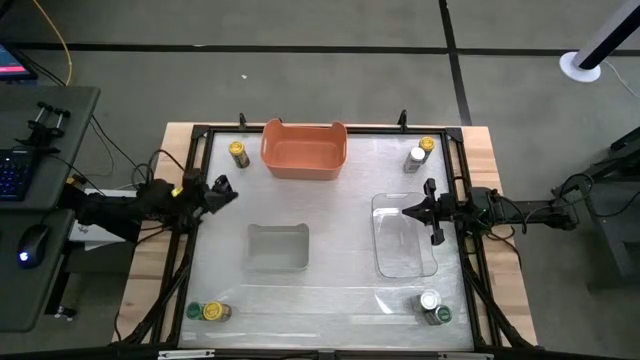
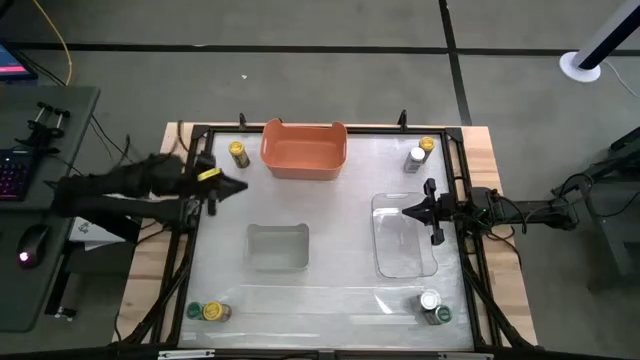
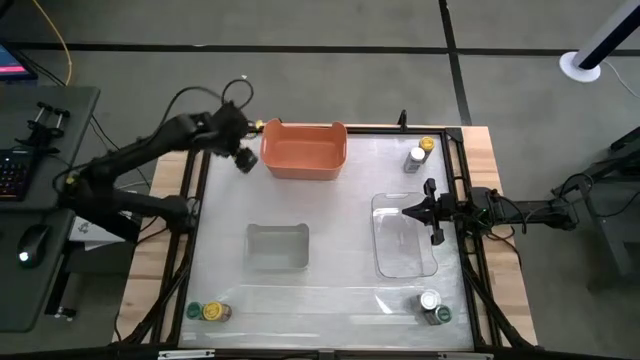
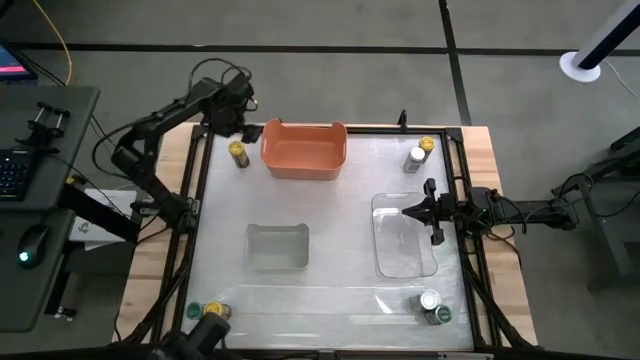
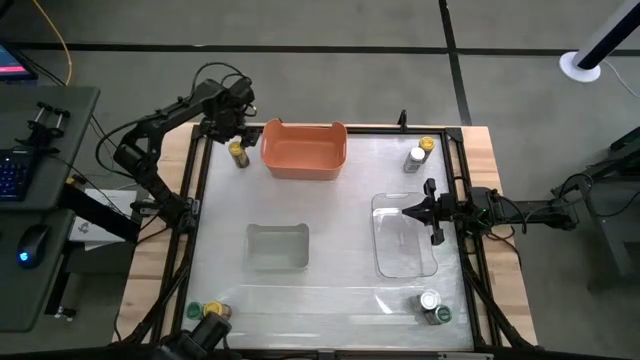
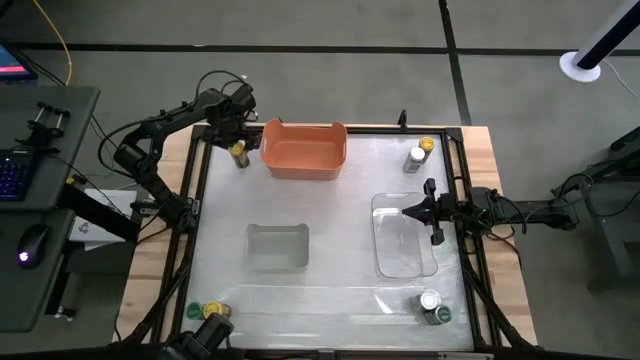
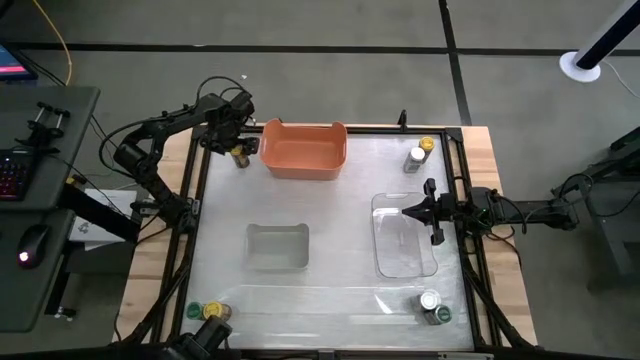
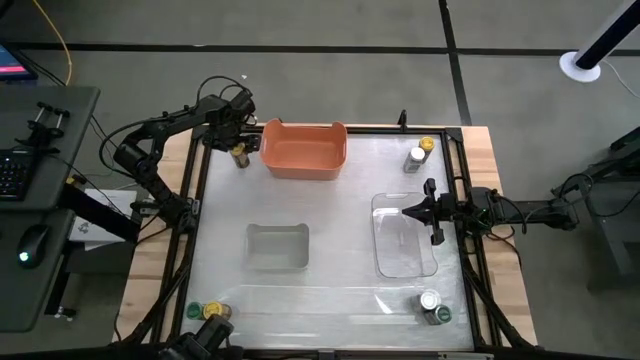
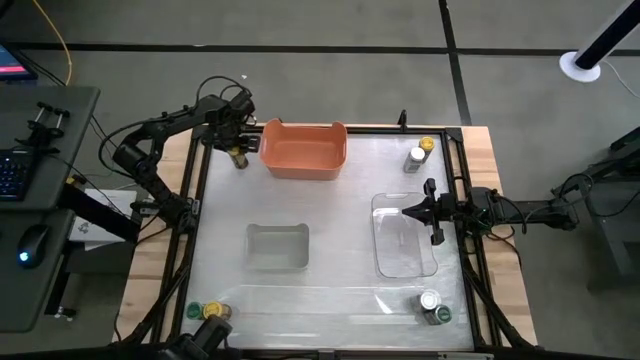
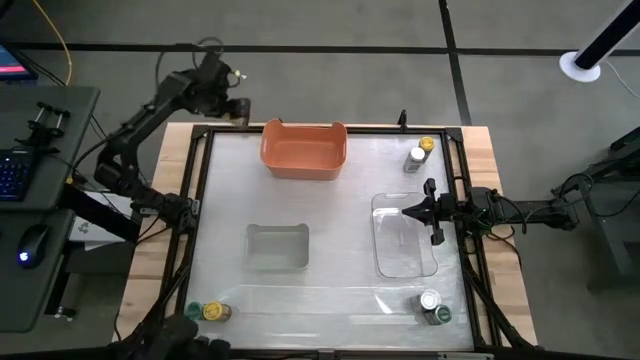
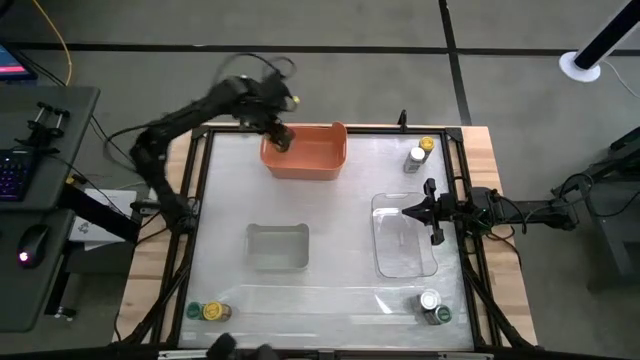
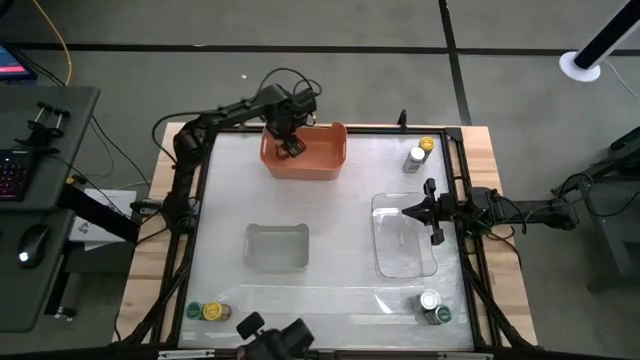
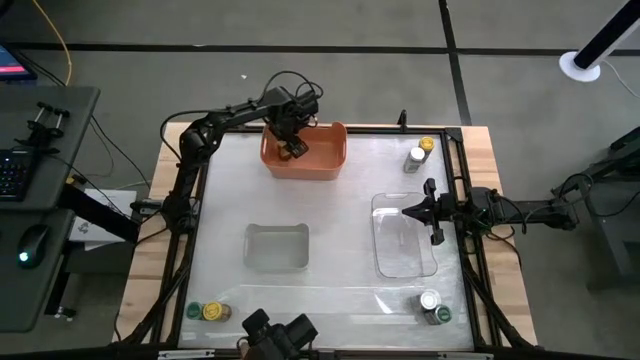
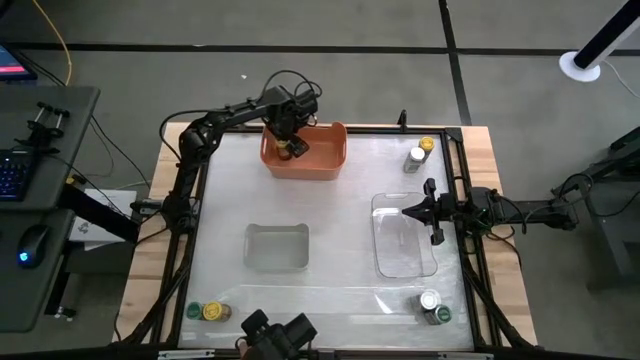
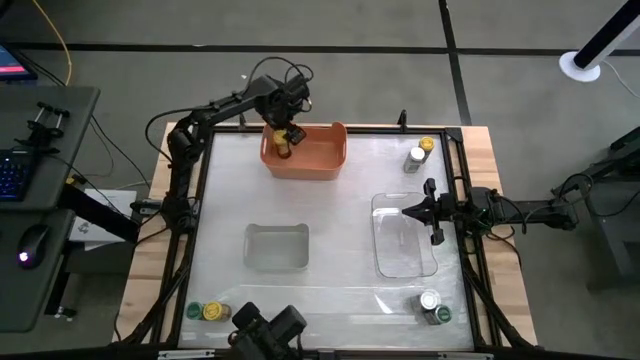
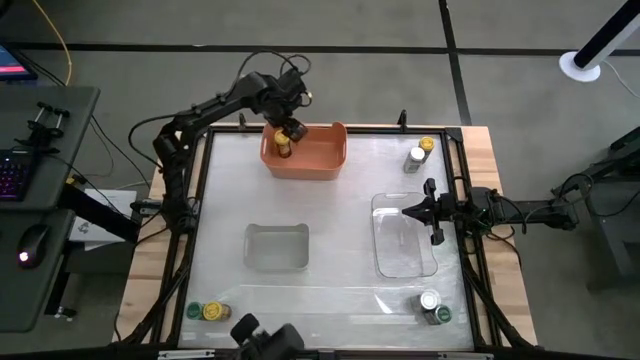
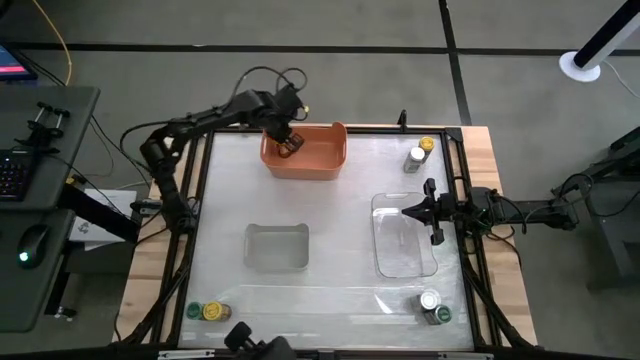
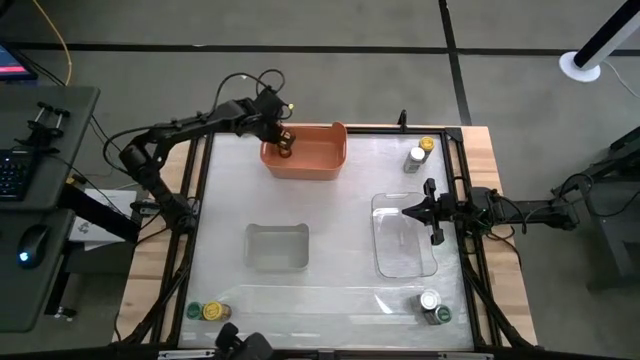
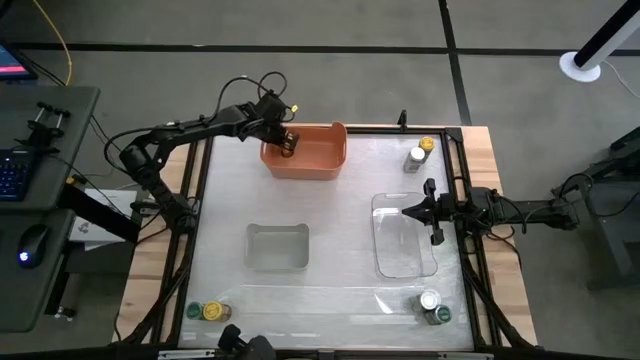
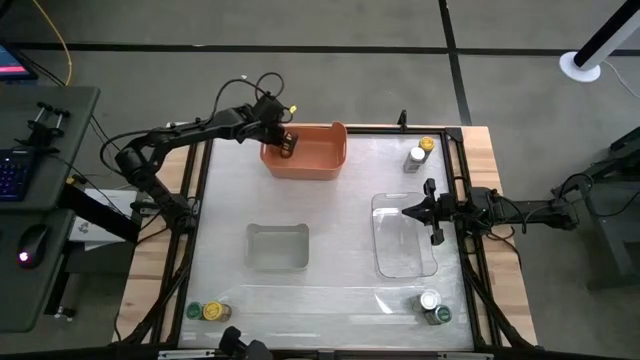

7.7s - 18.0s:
Task: Sort spices by type
Put the top left yellow seasoning bottle into the orange bin

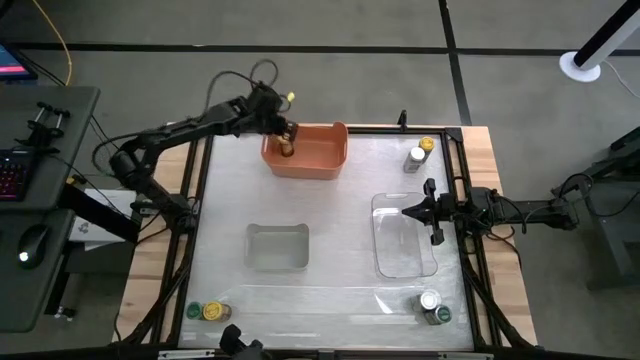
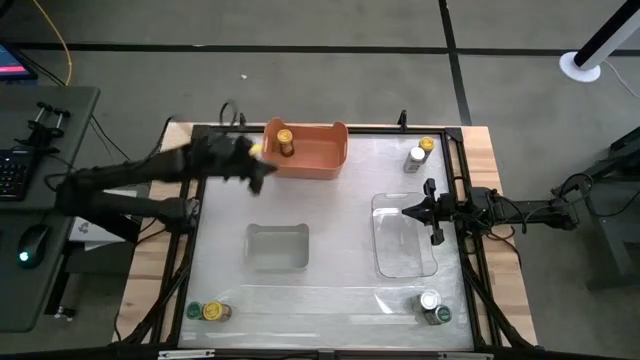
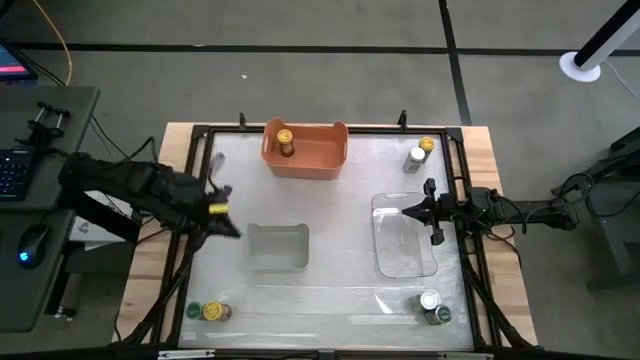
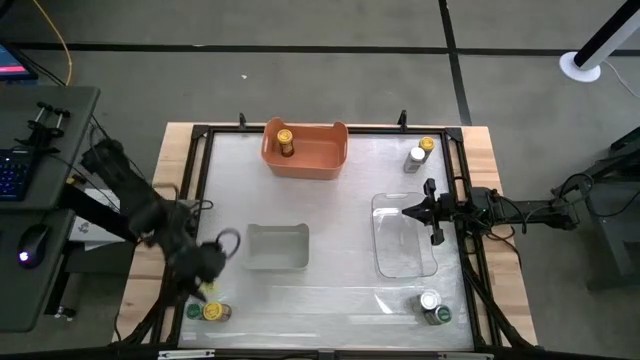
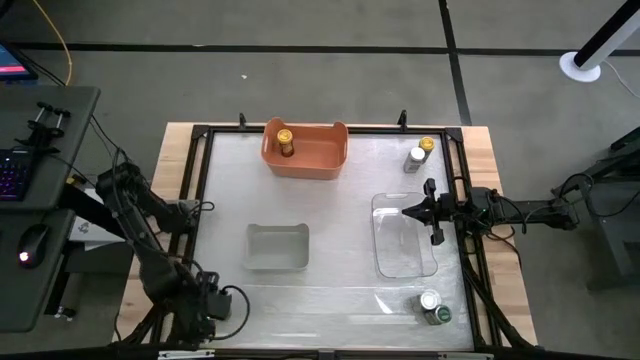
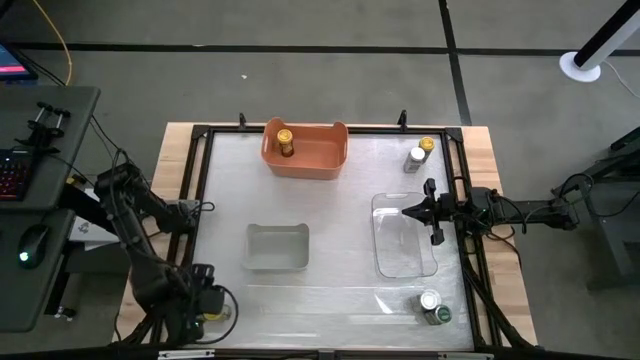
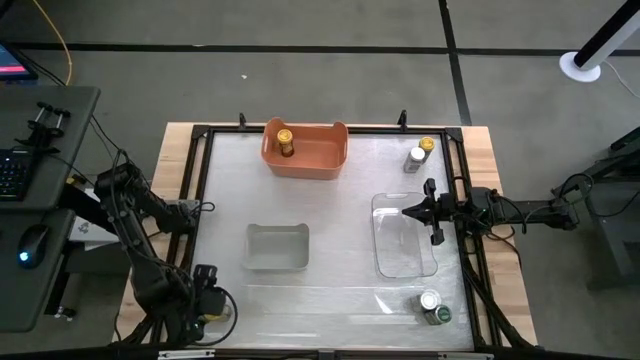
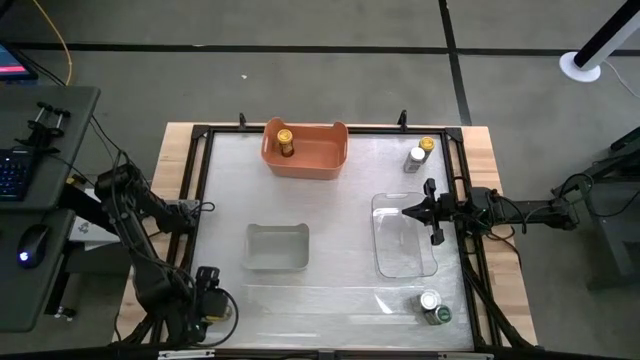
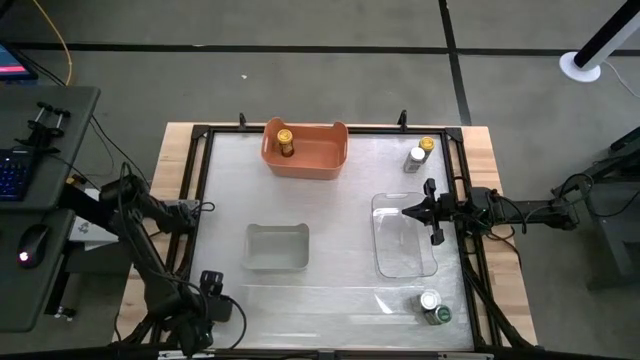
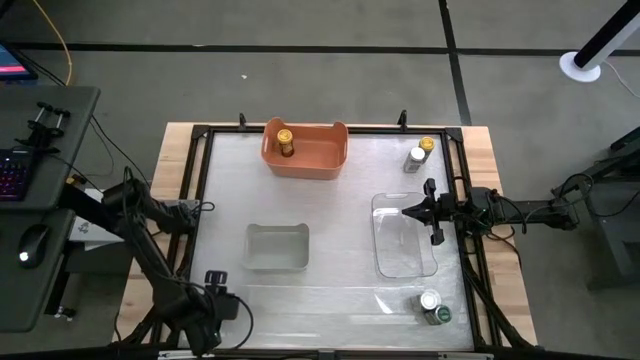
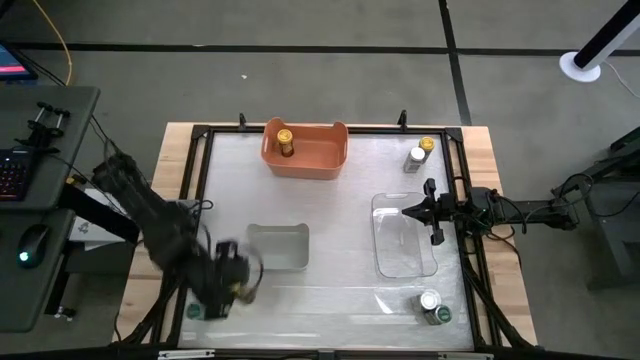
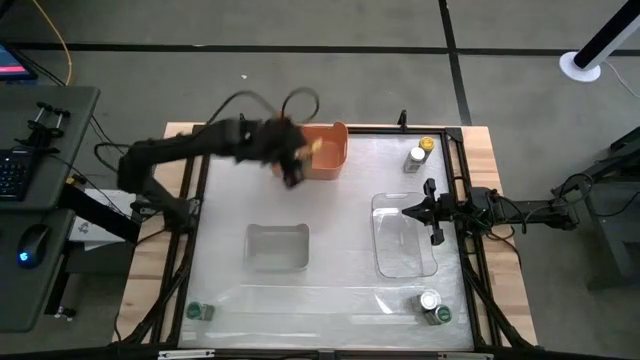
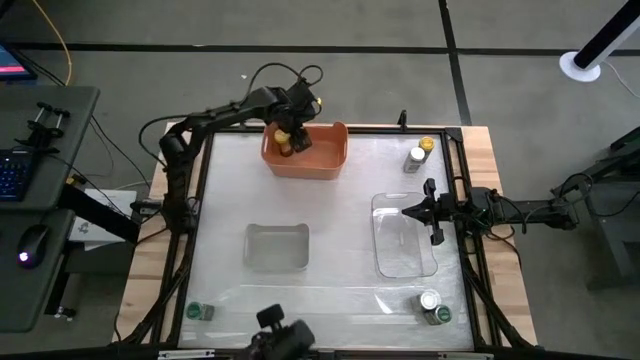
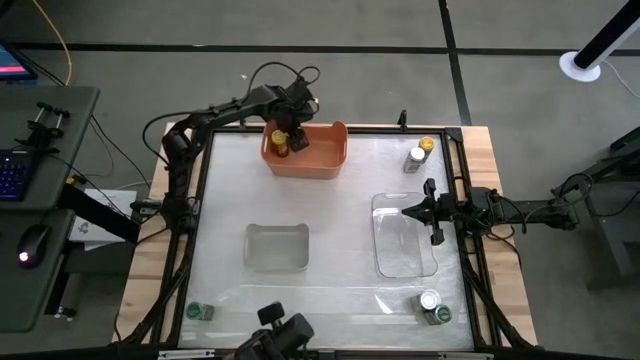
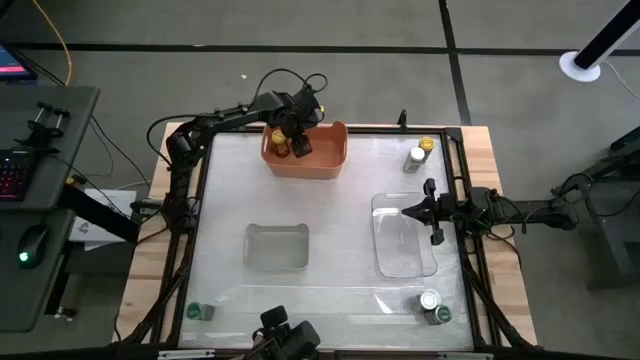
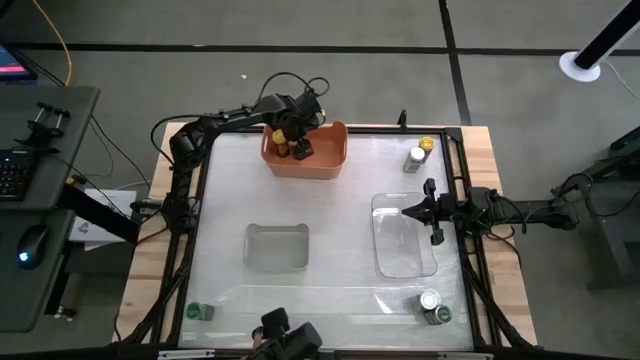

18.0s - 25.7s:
Put the bottom left yellow seasoning bottle into the orange bin

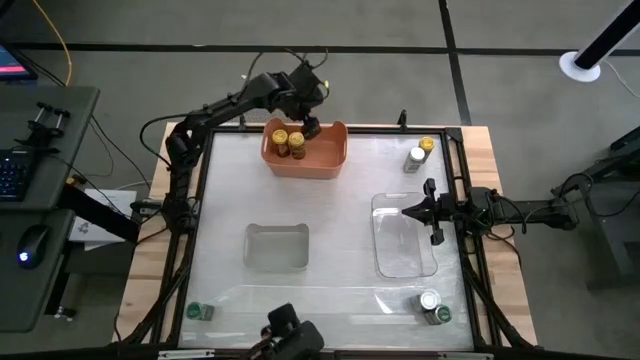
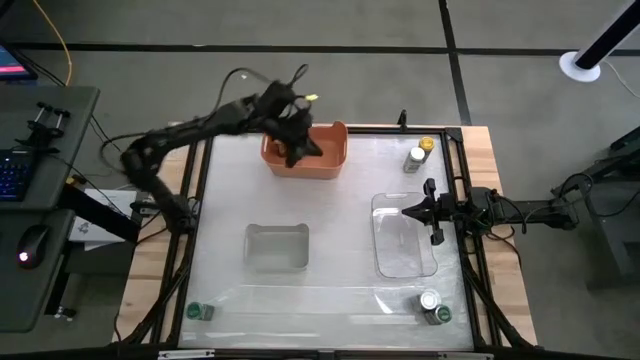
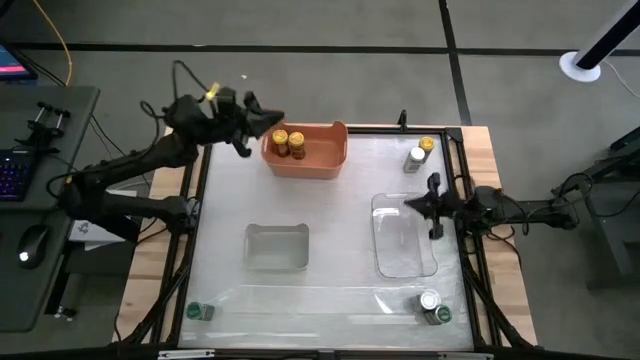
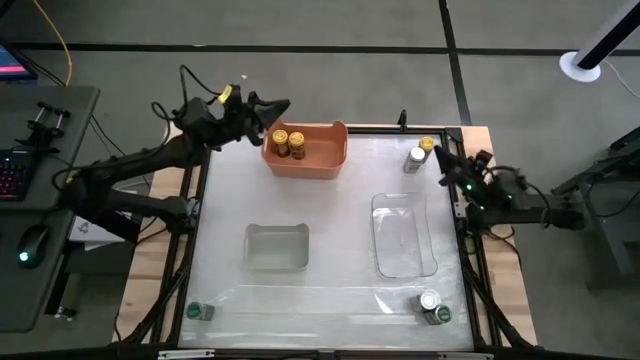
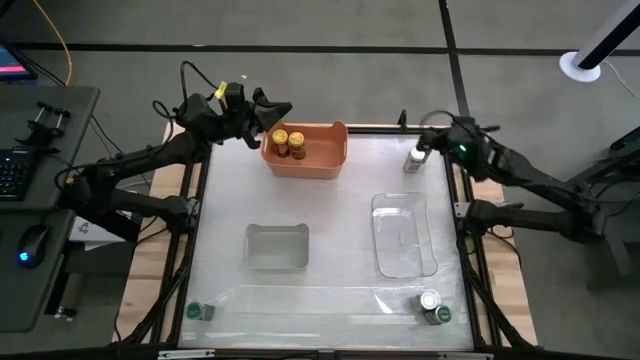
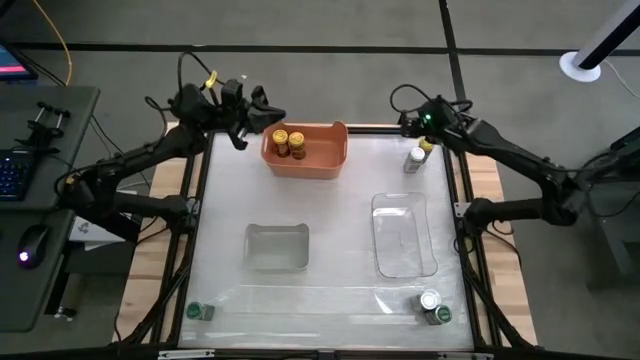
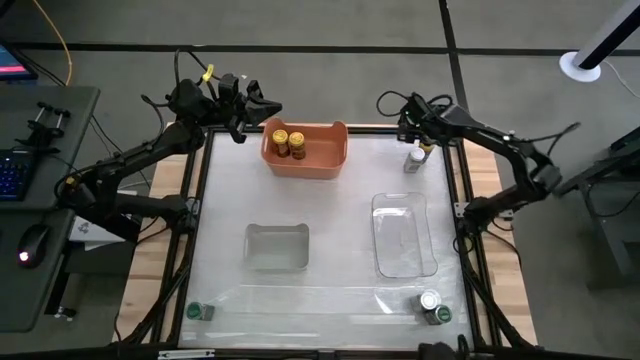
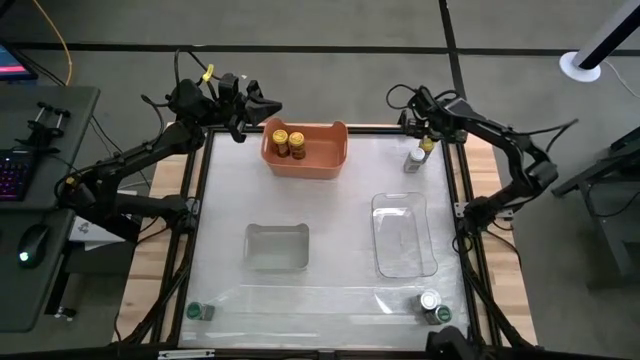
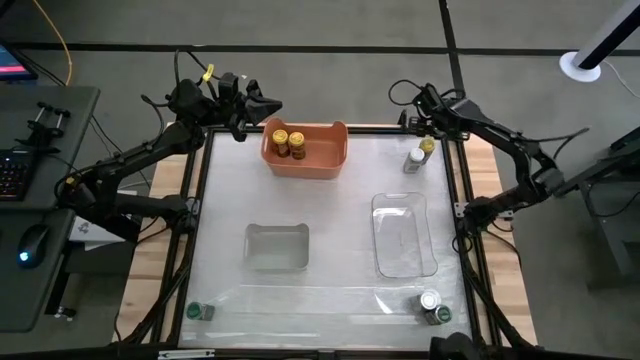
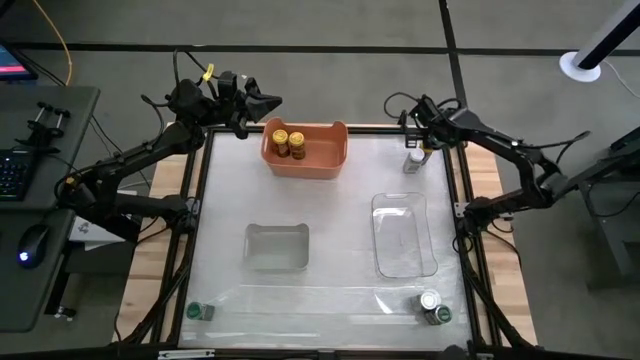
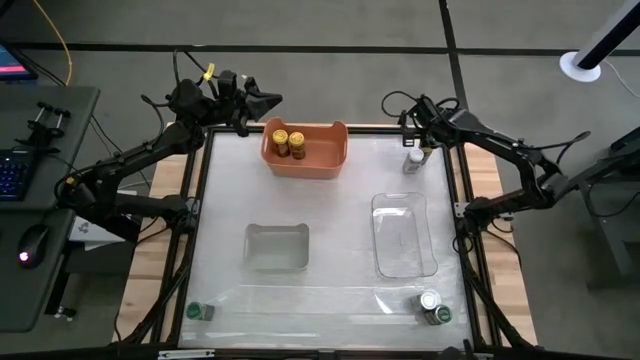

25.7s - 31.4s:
Put the yellow seasoning bottle into the orange bin
